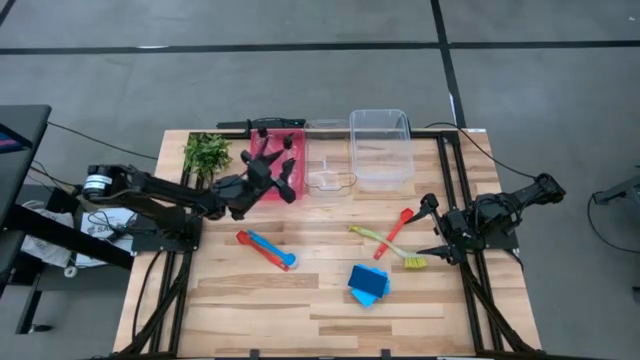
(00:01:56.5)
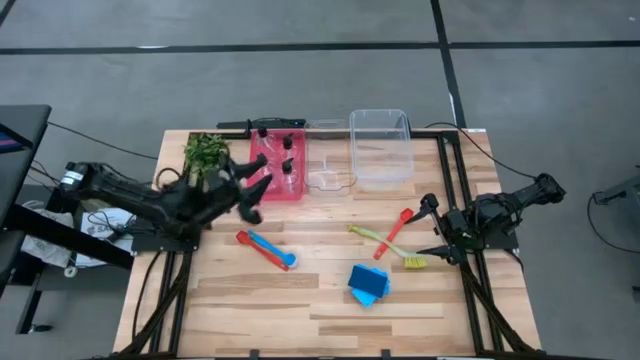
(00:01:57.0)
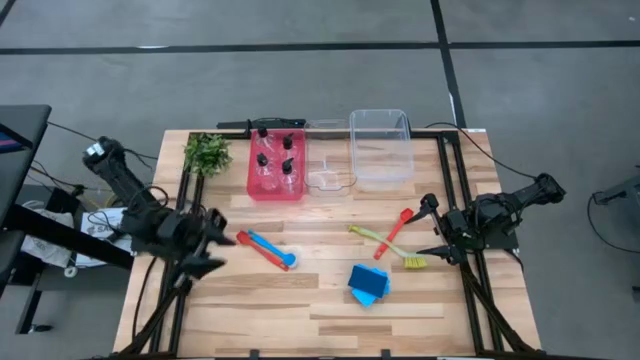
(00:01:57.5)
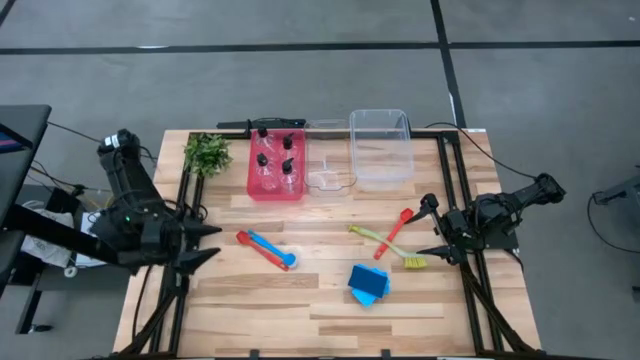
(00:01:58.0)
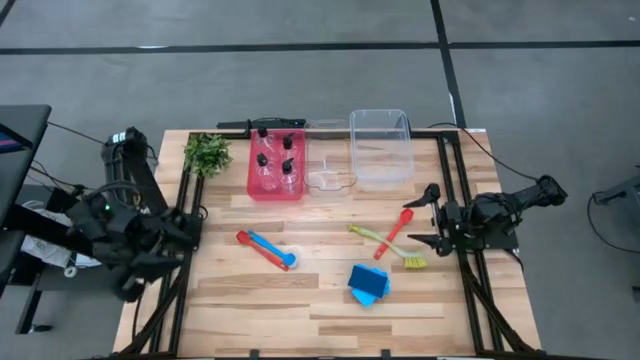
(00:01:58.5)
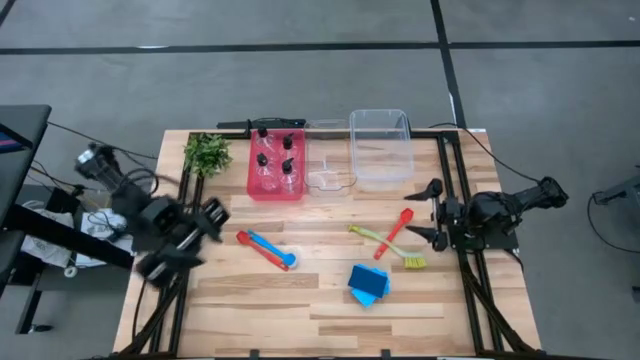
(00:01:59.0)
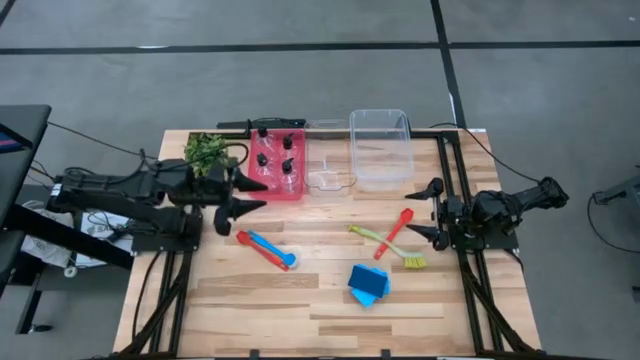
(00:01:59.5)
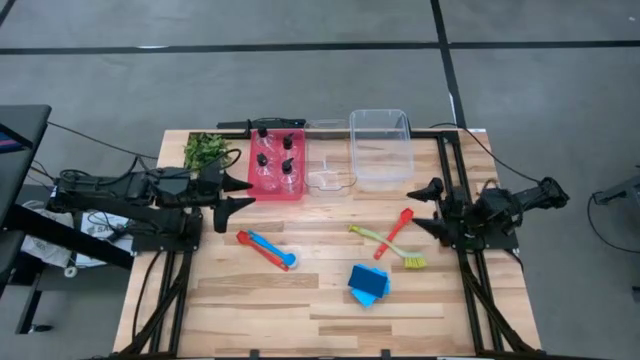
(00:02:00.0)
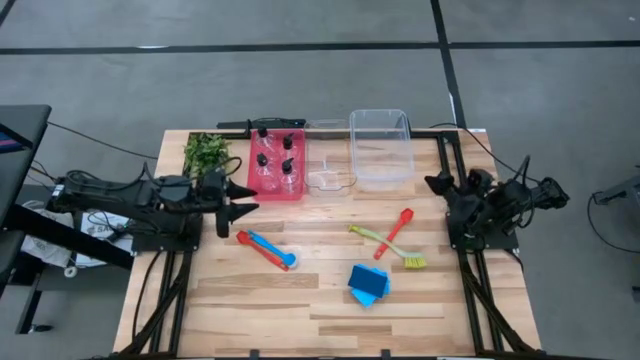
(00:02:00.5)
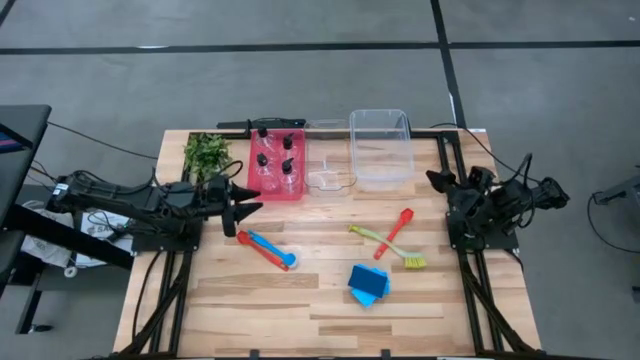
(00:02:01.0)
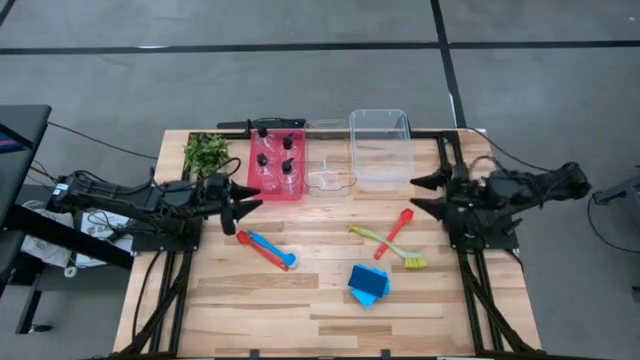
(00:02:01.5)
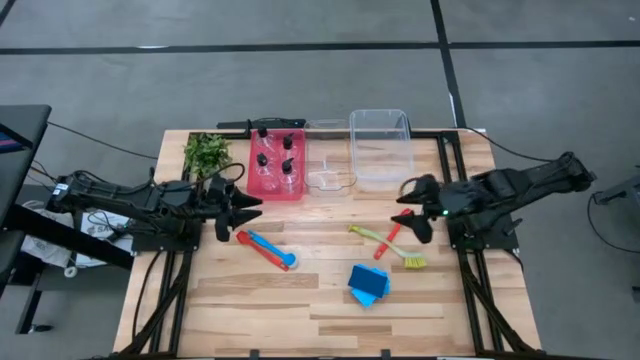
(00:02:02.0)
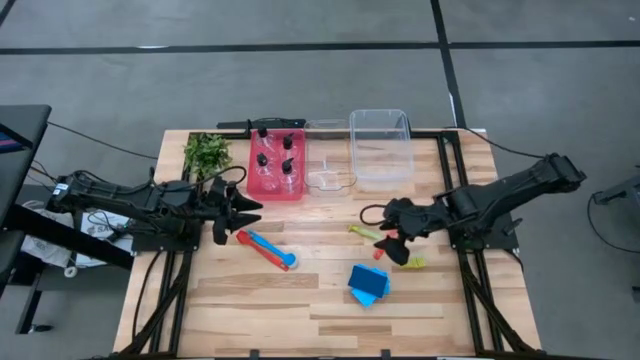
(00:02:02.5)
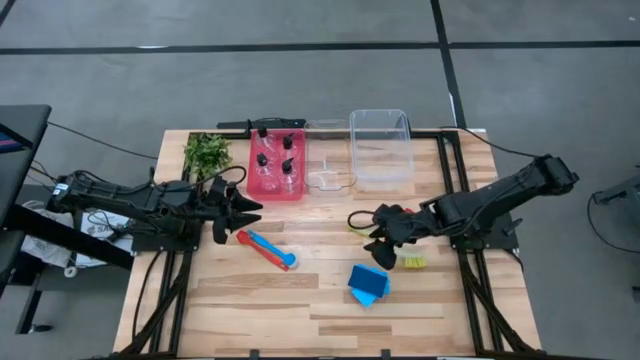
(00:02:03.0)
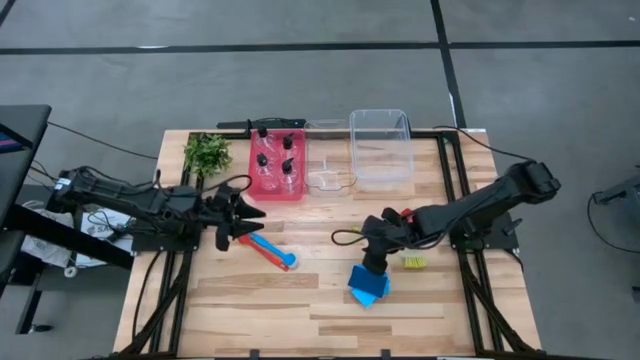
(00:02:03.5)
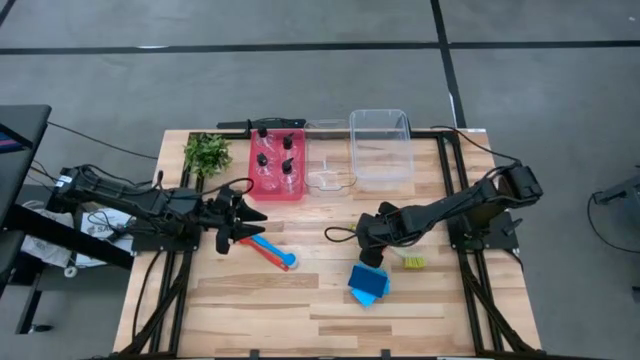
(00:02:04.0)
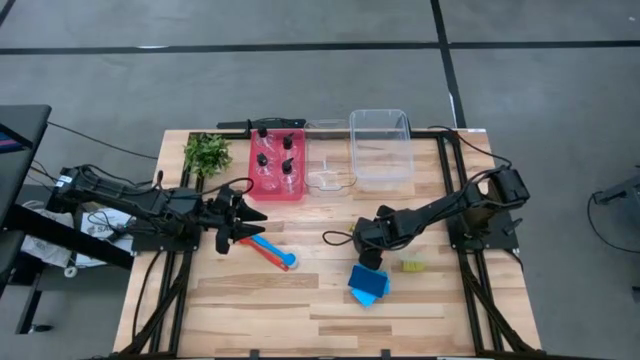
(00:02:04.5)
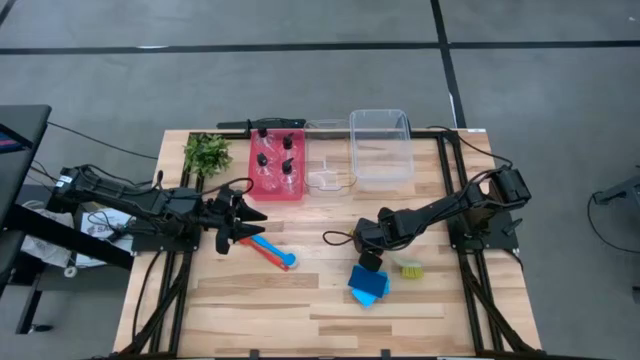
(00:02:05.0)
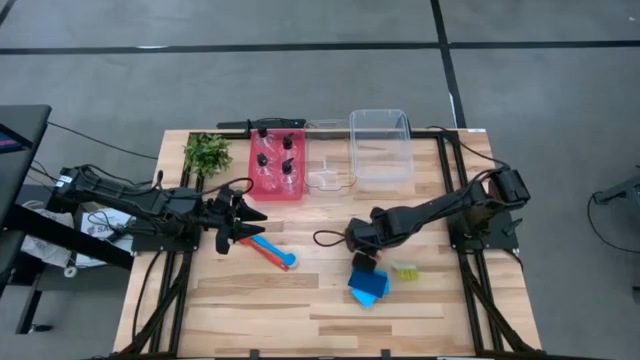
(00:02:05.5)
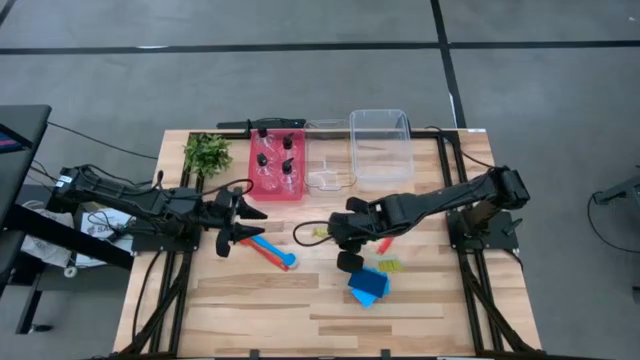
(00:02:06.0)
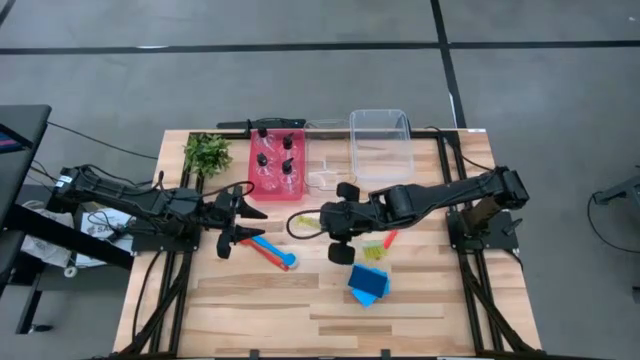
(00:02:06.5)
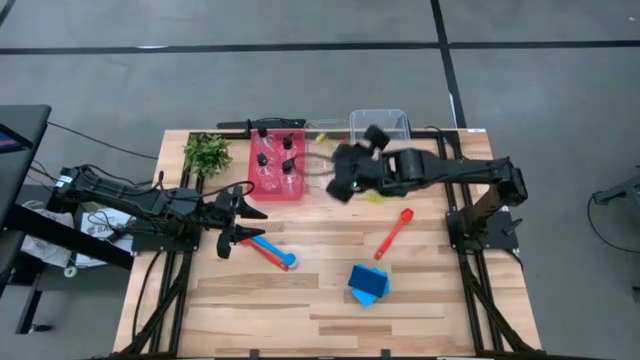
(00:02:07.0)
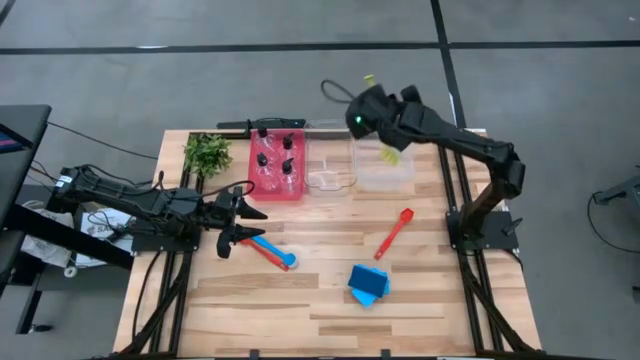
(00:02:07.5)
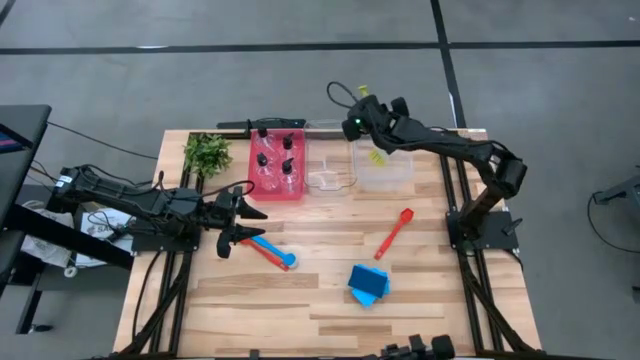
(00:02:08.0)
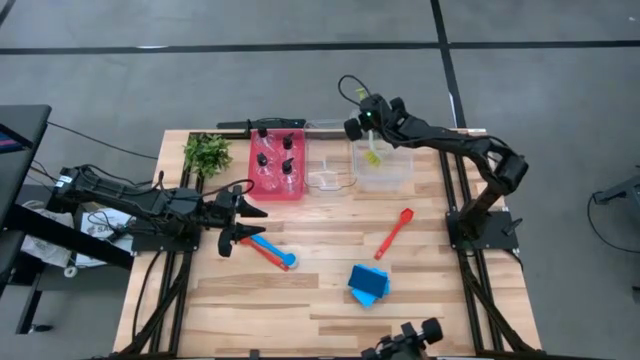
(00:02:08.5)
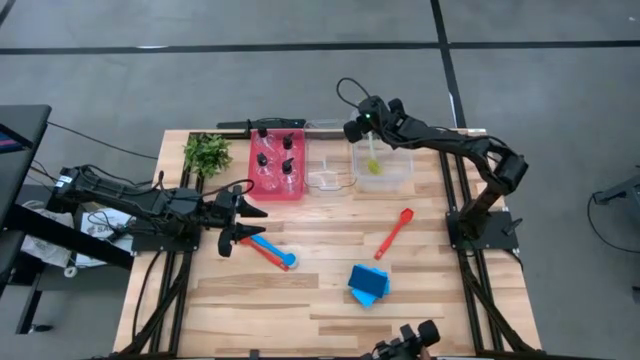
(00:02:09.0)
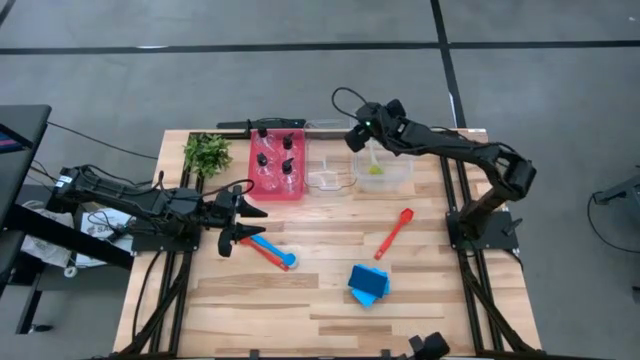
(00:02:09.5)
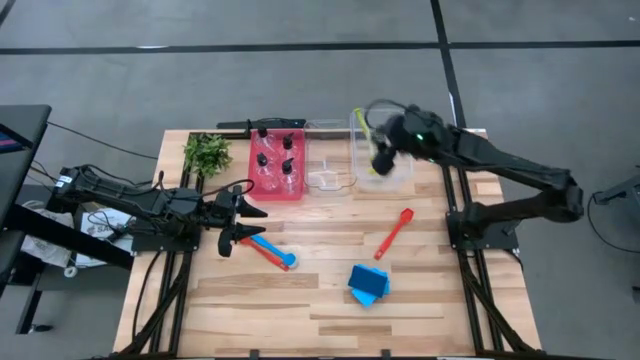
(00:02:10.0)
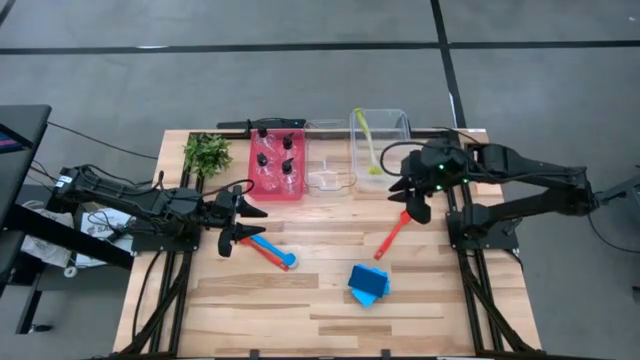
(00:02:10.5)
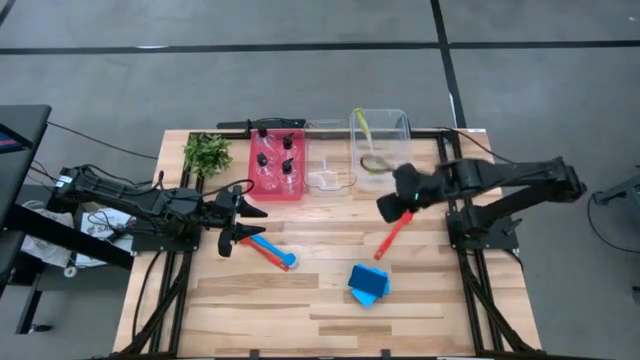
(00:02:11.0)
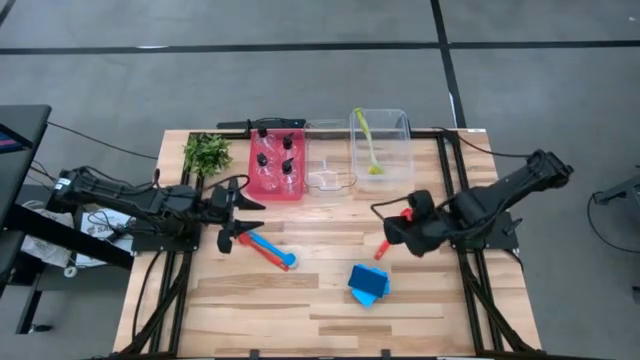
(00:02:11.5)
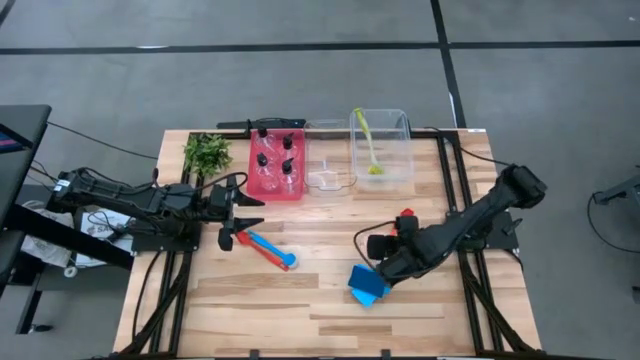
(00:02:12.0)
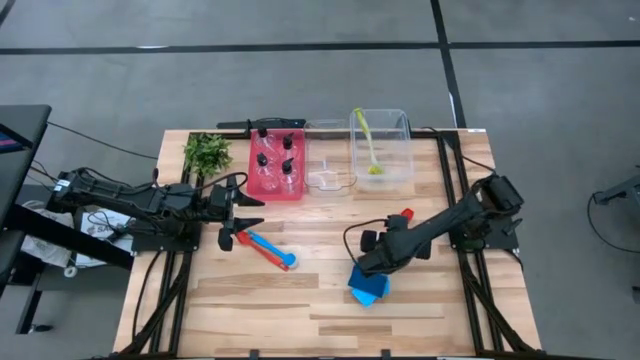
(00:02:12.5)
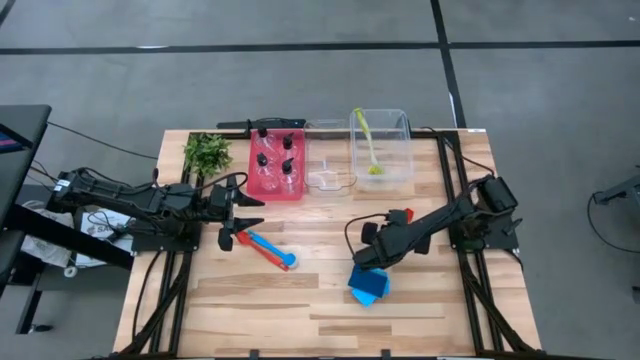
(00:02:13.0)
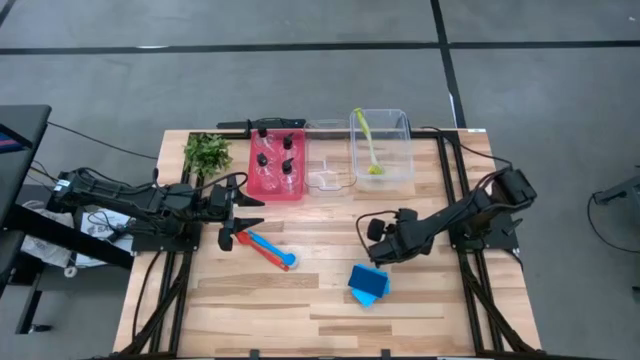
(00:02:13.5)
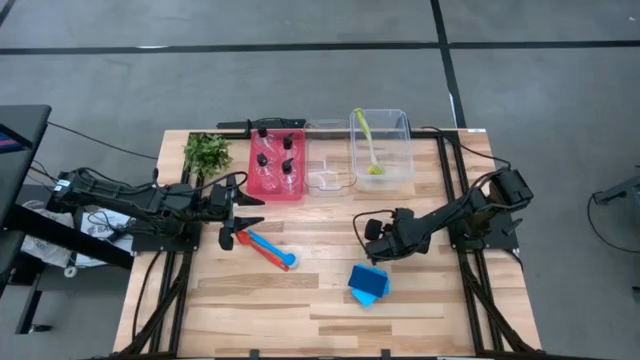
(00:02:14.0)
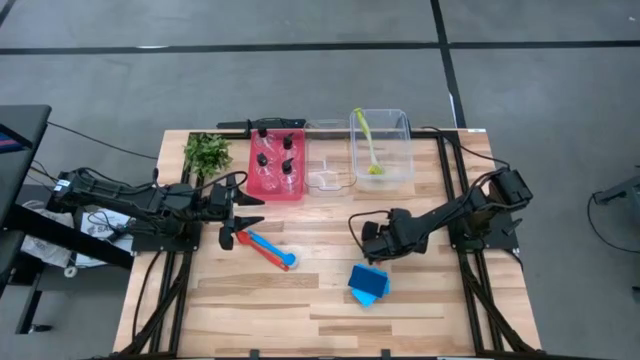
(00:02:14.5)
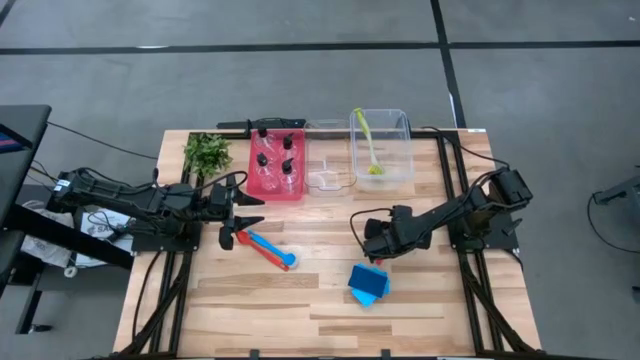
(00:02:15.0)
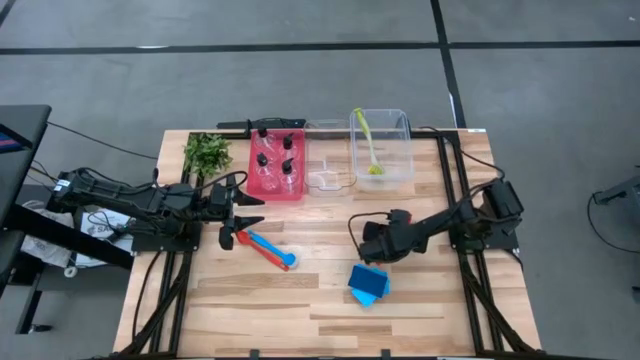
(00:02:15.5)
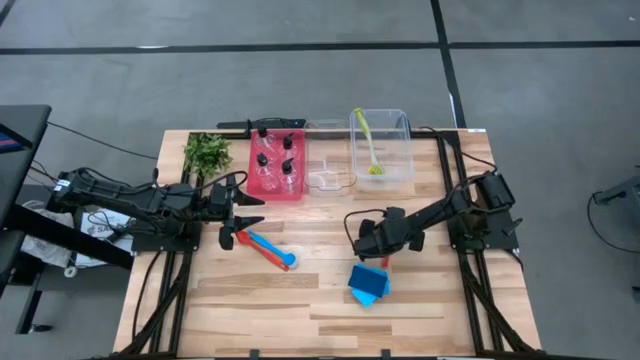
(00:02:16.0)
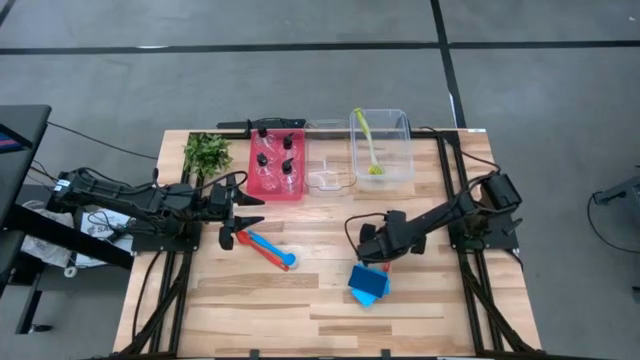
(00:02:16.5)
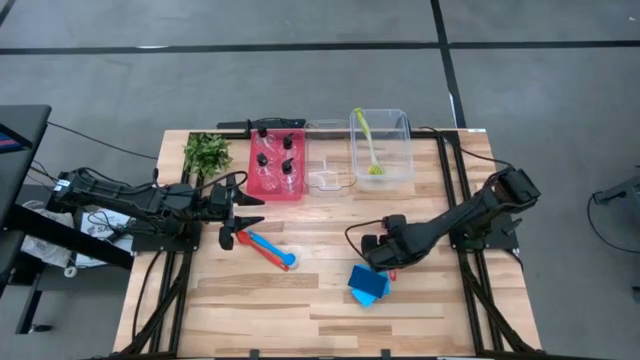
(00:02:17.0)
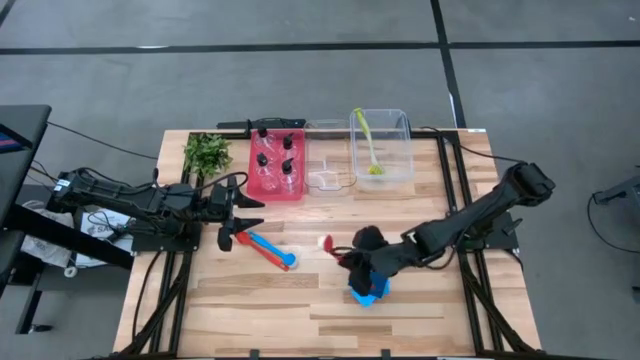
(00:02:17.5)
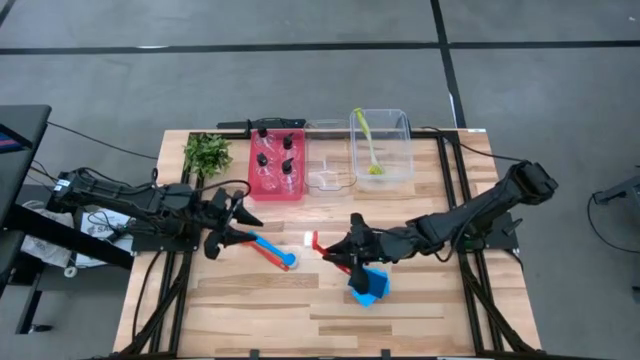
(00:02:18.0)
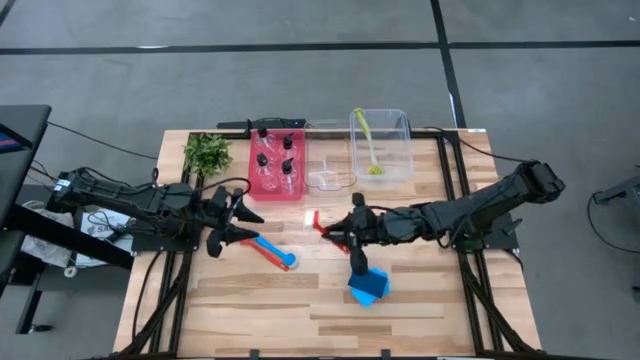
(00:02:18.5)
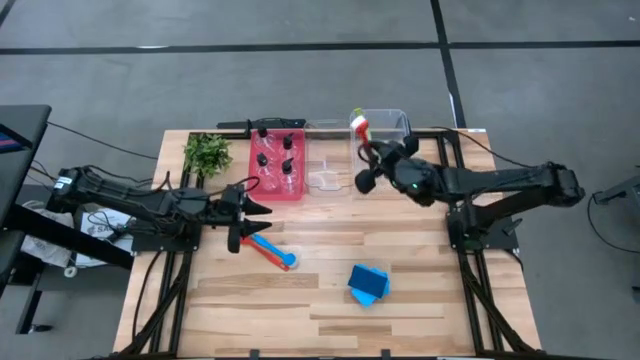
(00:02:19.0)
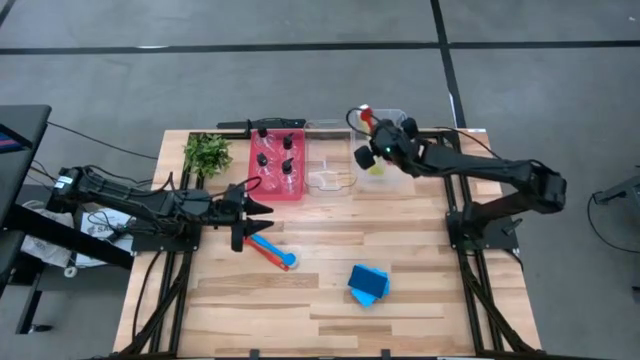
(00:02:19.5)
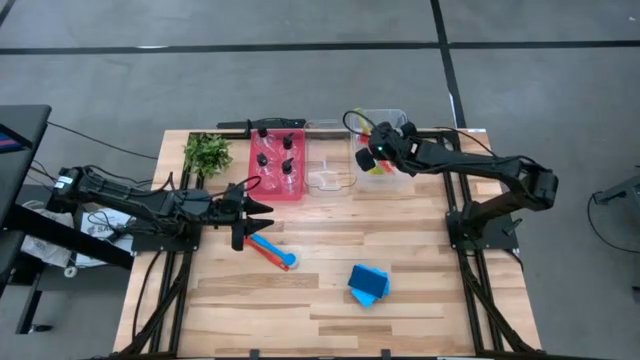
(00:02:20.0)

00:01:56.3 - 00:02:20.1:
Task: Pick & Place Kitchen Sink Supplies
Put the right red scrubbing brush into the white bin
